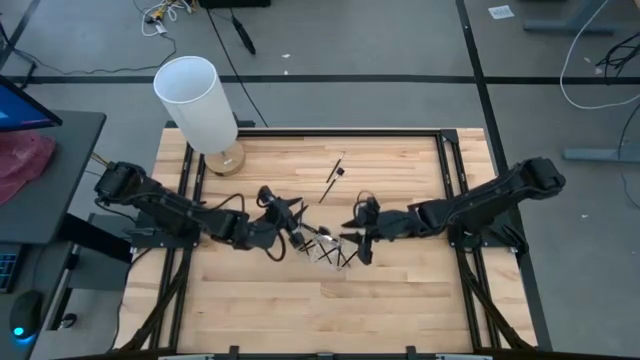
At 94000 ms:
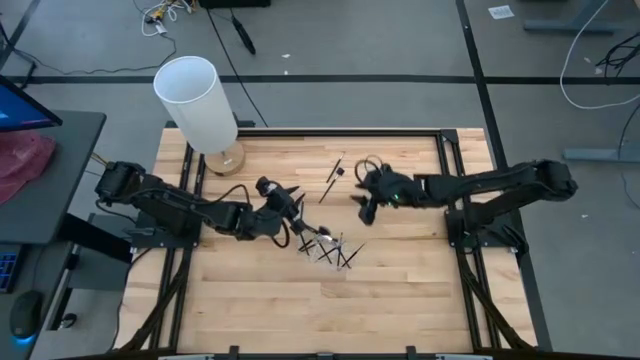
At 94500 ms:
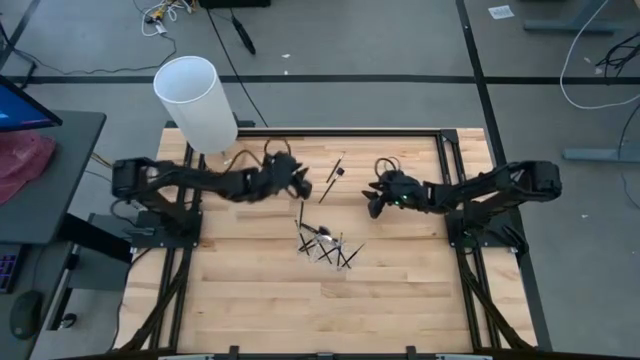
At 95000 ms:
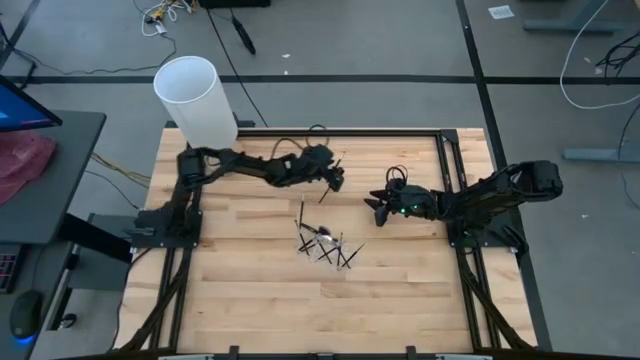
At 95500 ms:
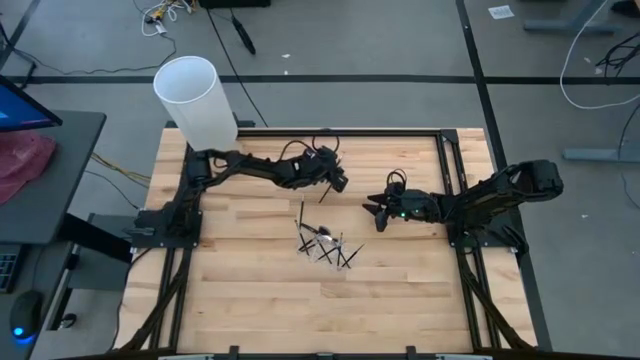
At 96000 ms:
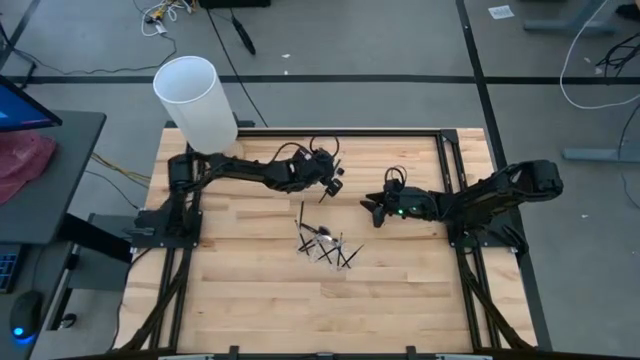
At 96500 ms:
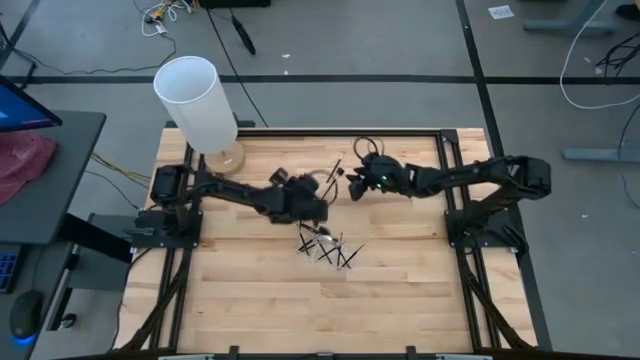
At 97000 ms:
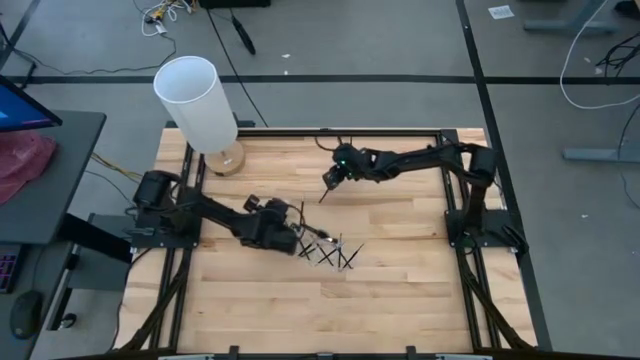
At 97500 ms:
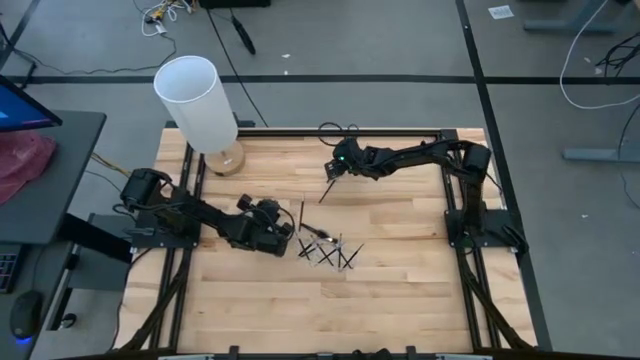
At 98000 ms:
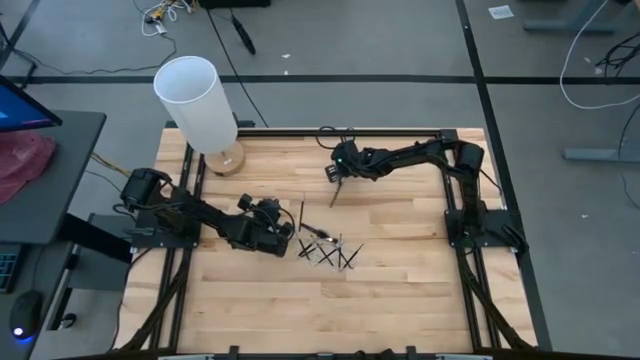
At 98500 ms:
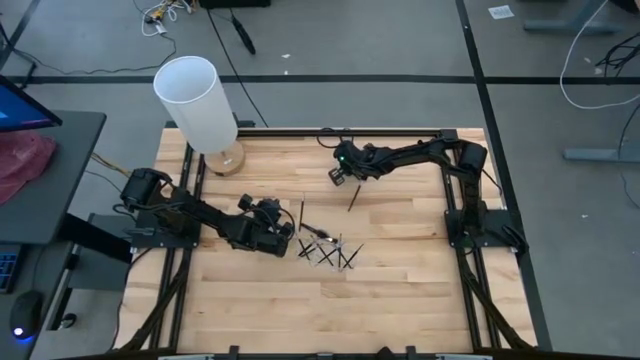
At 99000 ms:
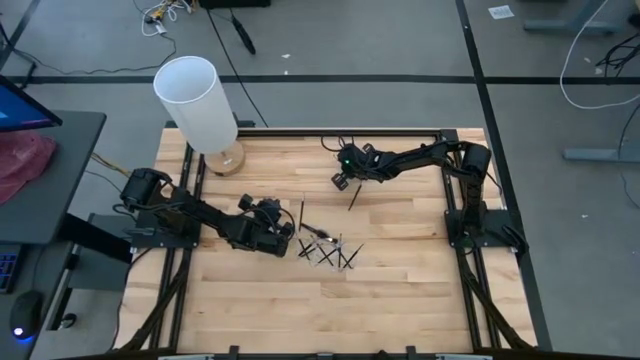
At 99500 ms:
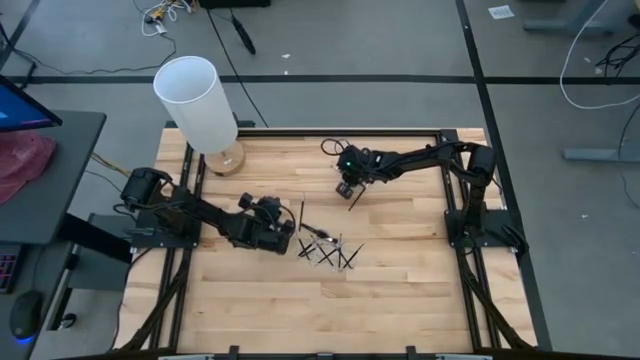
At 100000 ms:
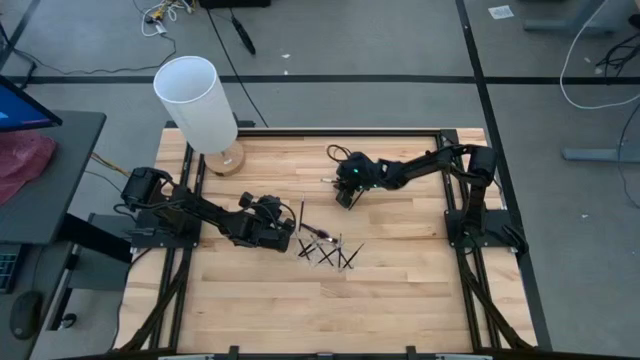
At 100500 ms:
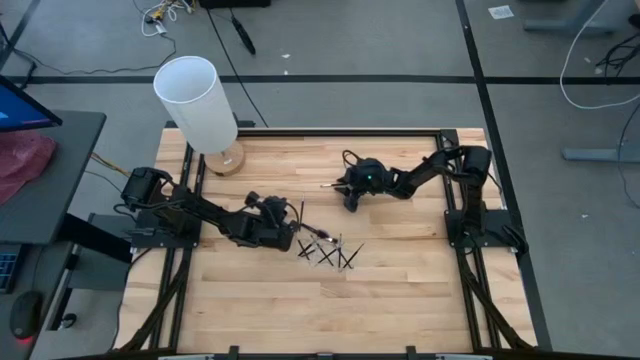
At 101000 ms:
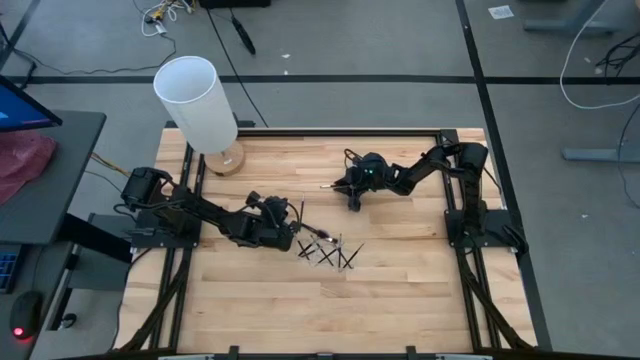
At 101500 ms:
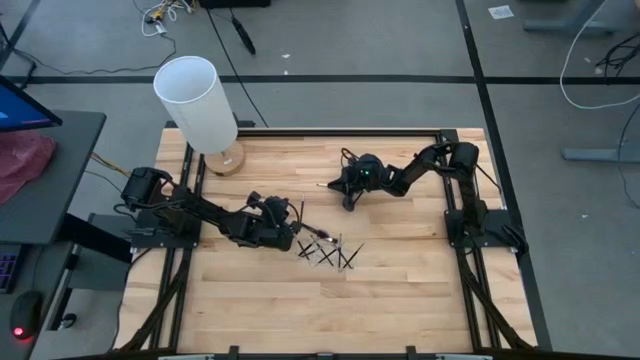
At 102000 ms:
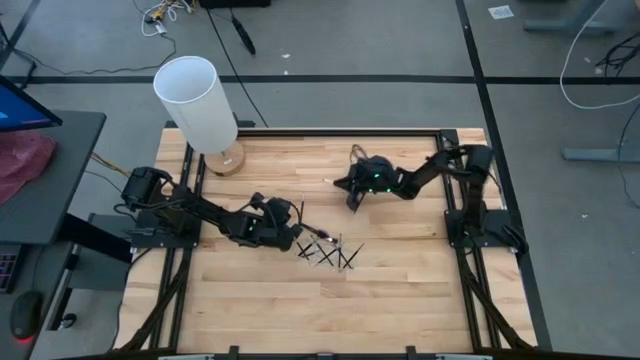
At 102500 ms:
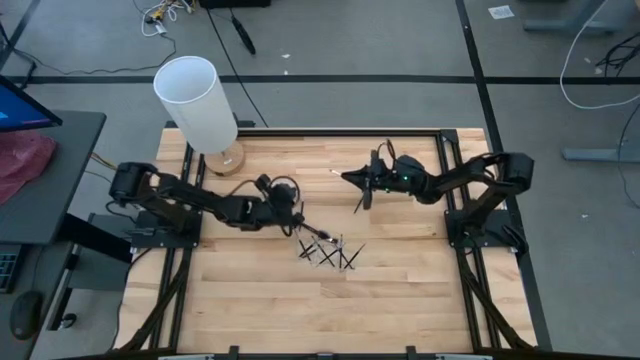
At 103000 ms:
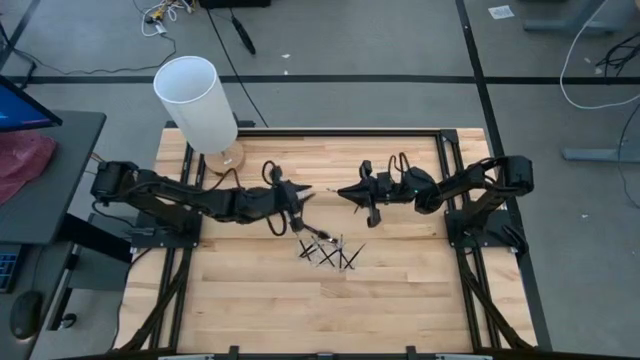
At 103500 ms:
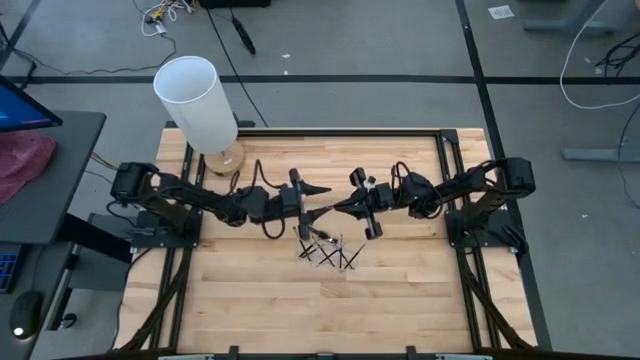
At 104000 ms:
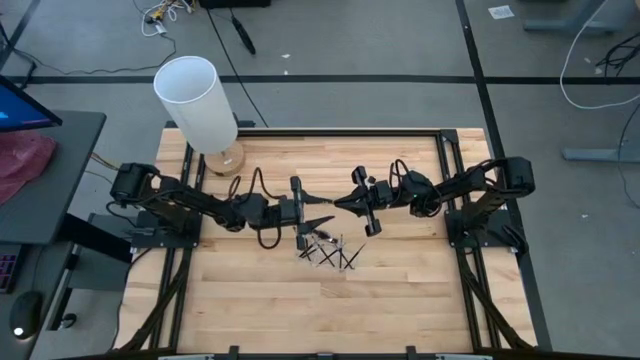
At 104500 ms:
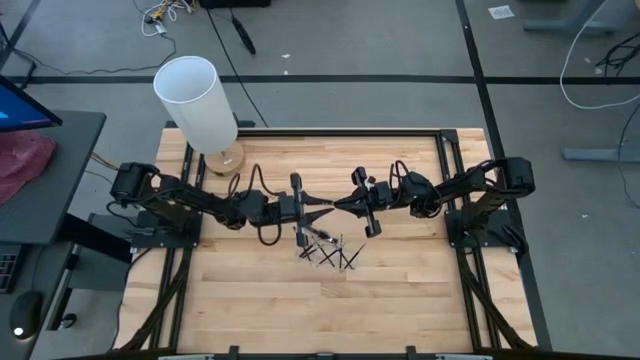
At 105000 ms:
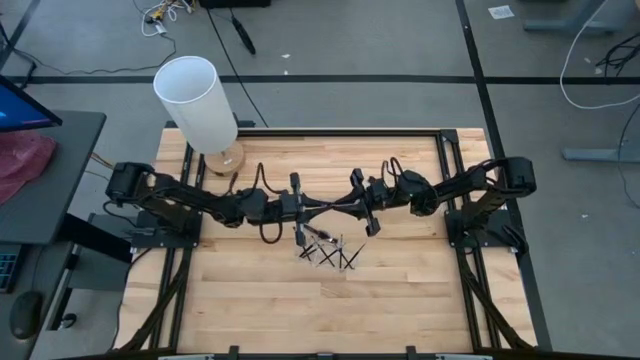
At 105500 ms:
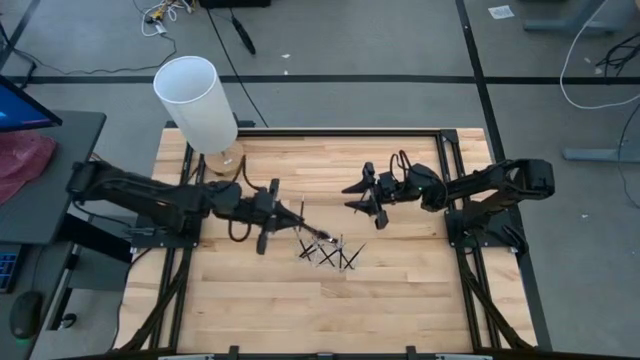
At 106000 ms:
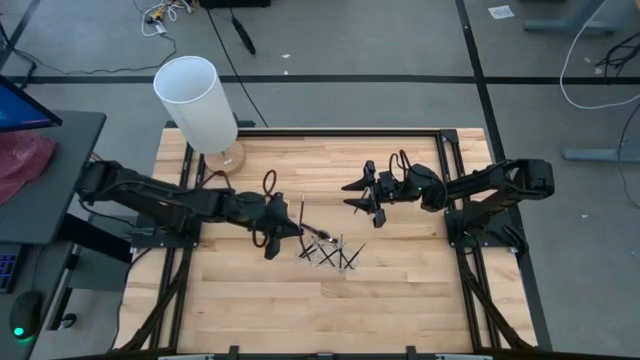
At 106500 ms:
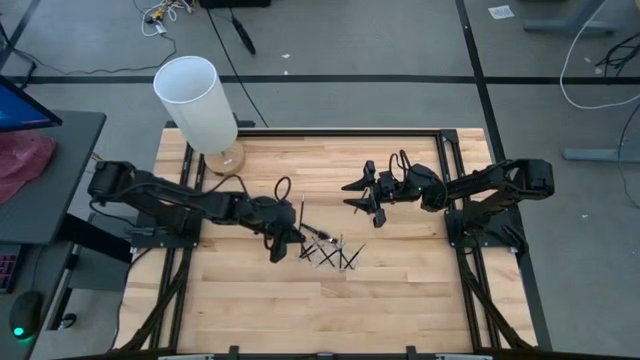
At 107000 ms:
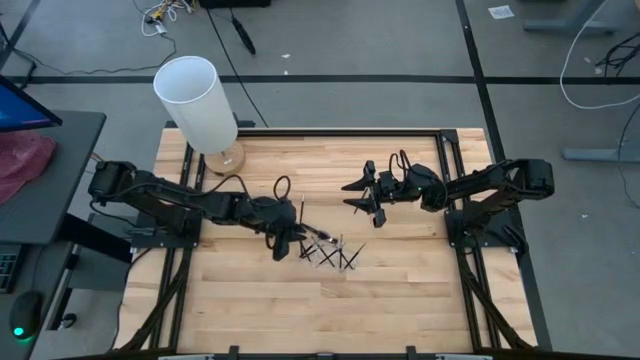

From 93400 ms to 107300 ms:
Task: Put items in baskets/containers
Put the black eyeshadow brush into the transparent organizer

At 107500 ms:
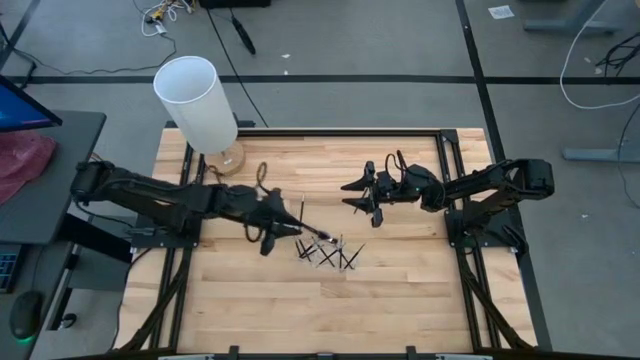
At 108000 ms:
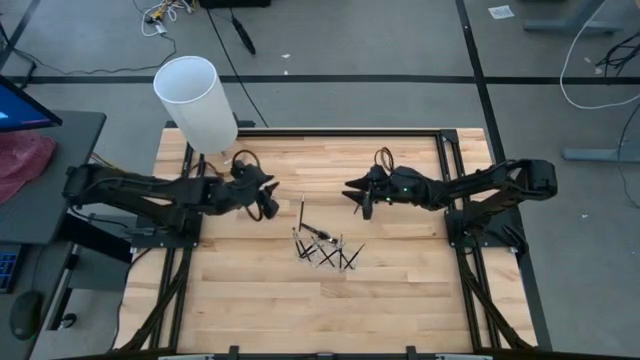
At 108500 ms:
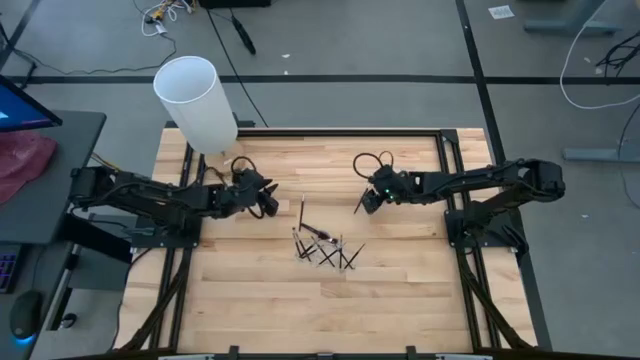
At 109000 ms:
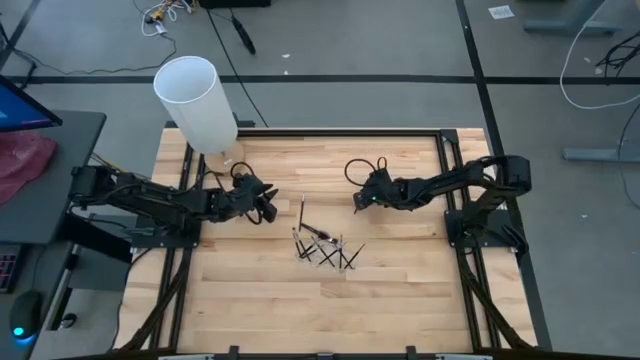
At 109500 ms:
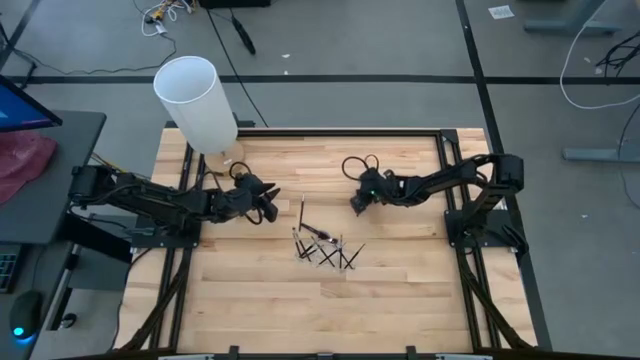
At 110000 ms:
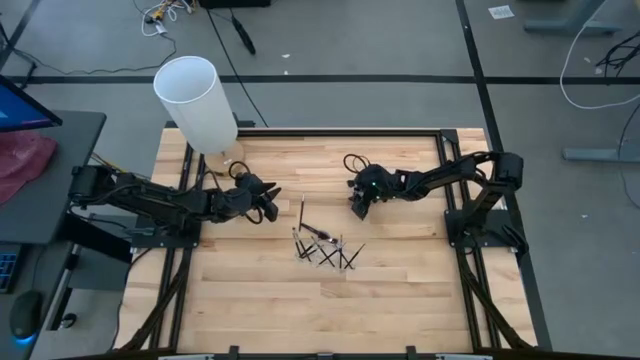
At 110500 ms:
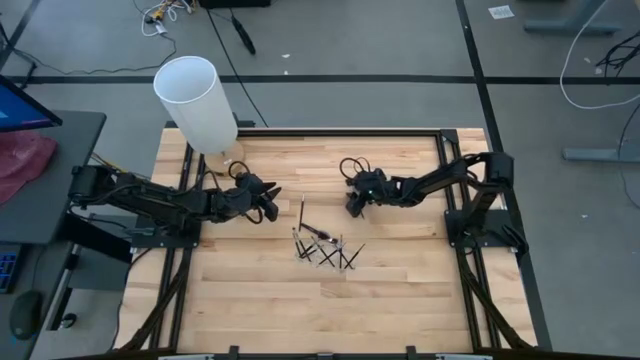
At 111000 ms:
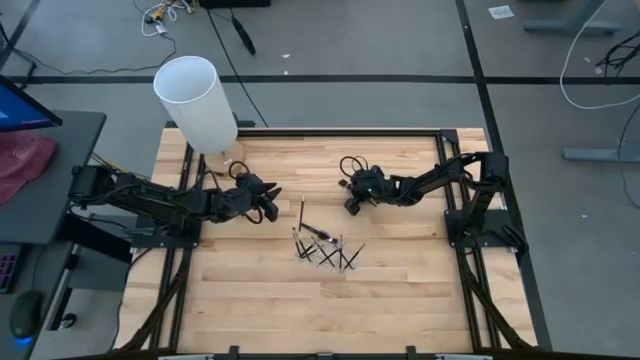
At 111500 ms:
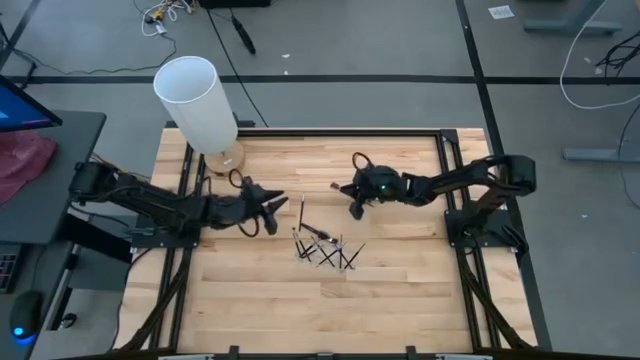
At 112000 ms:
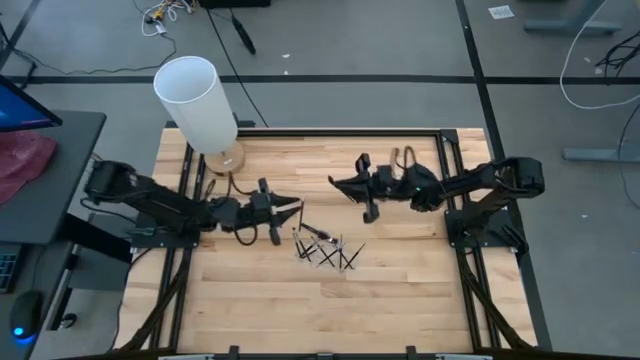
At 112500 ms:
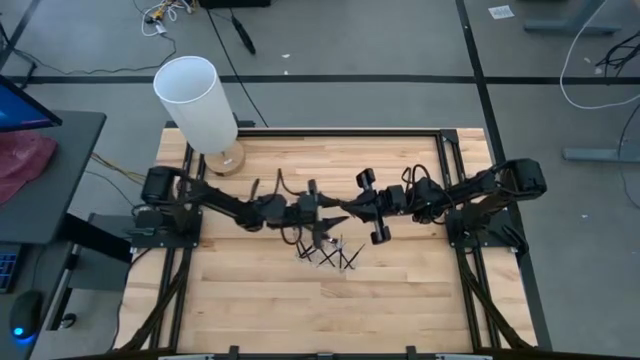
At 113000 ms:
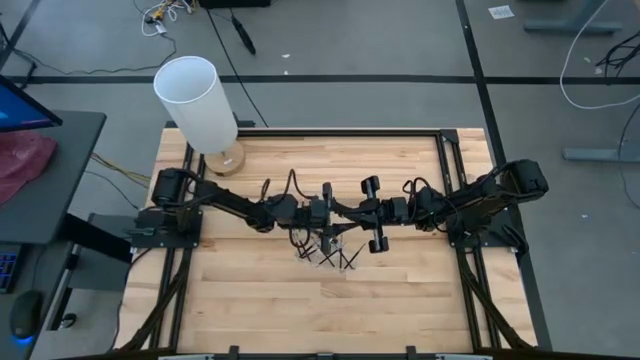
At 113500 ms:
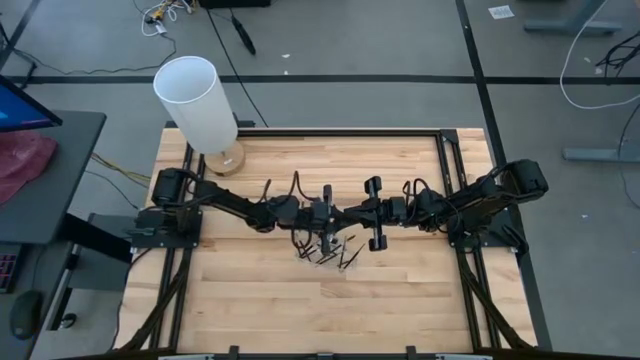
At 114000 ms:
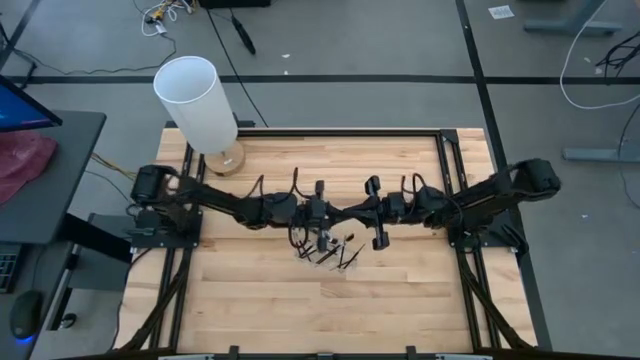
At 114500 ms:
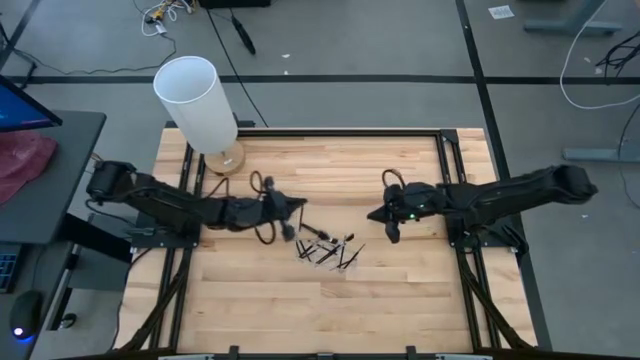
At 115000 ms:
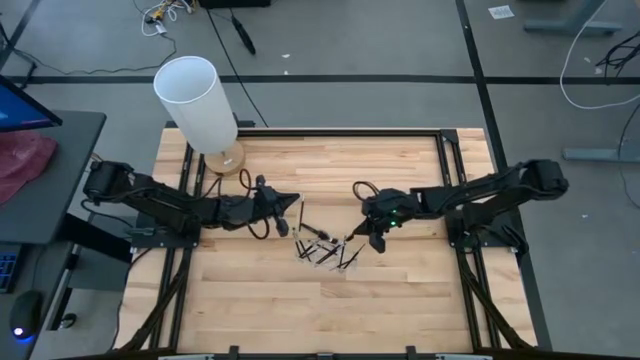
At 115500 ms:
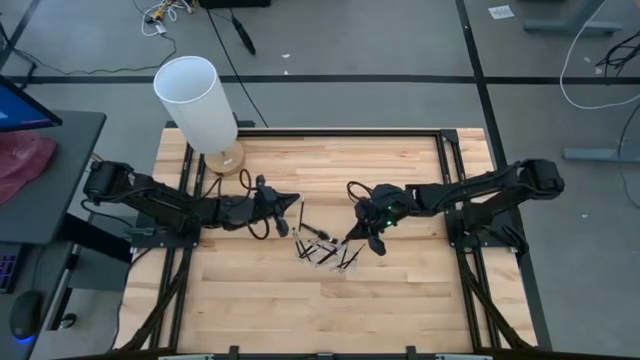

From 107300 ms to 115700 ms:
Put the black brow brush into the transparent organizer
